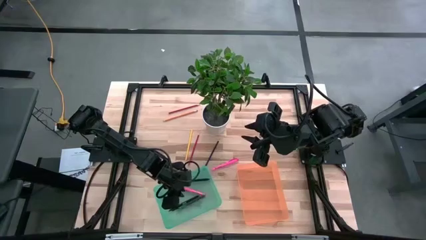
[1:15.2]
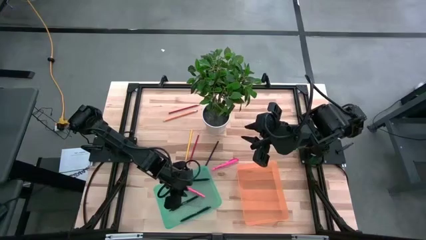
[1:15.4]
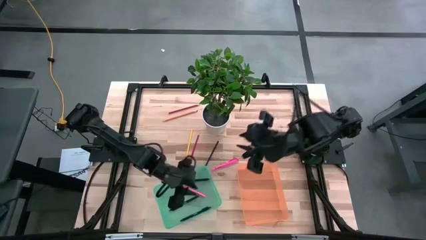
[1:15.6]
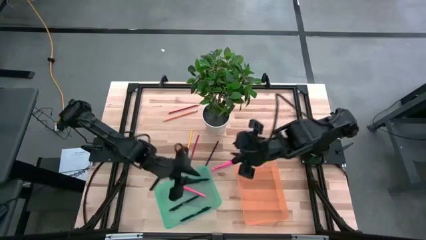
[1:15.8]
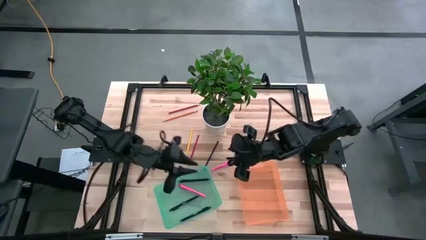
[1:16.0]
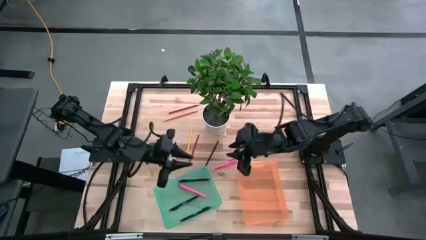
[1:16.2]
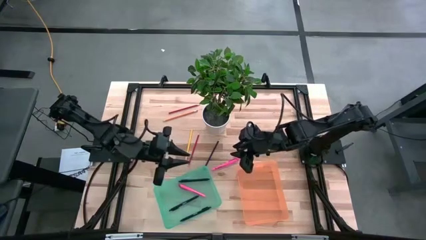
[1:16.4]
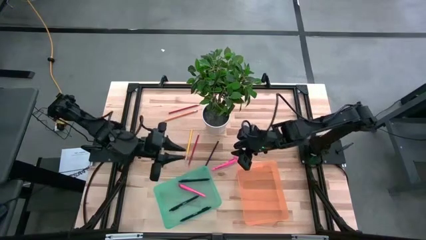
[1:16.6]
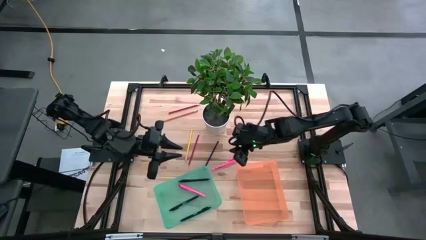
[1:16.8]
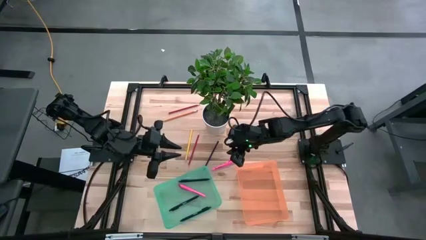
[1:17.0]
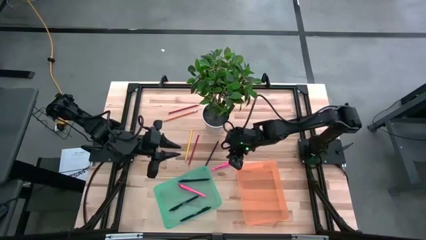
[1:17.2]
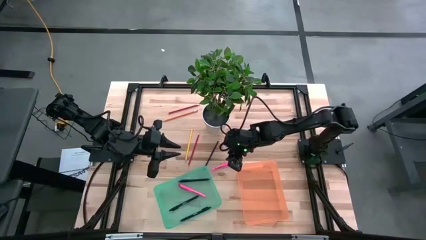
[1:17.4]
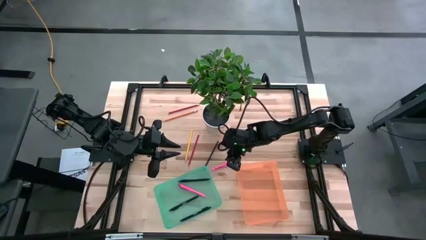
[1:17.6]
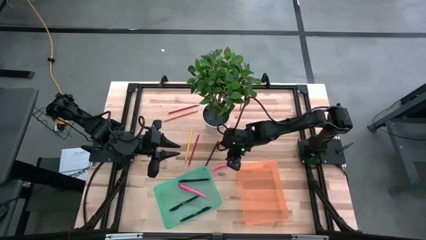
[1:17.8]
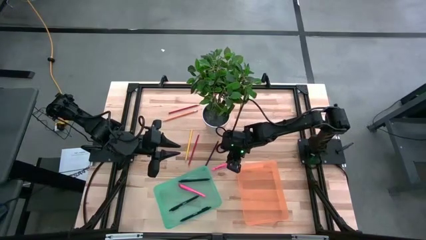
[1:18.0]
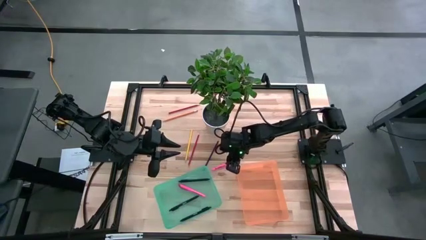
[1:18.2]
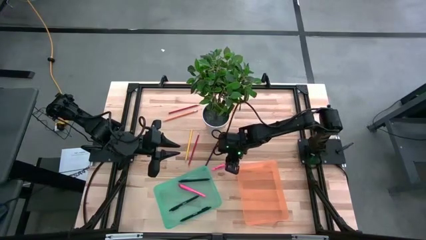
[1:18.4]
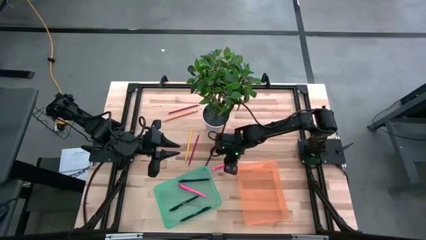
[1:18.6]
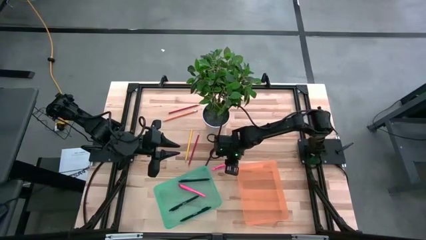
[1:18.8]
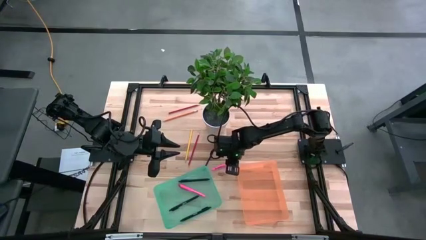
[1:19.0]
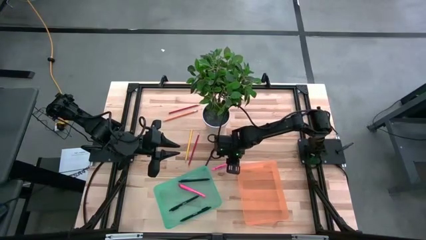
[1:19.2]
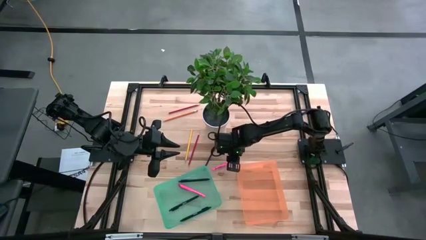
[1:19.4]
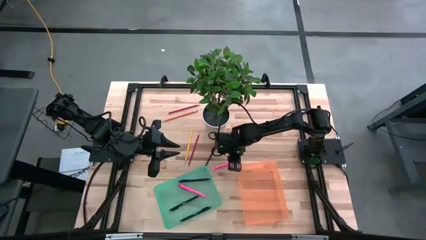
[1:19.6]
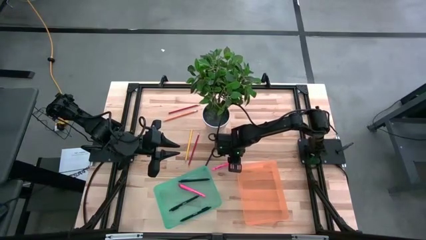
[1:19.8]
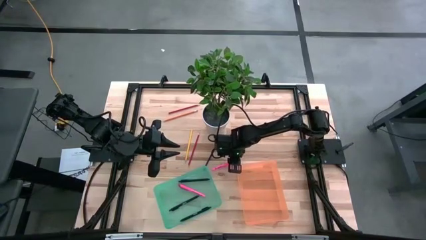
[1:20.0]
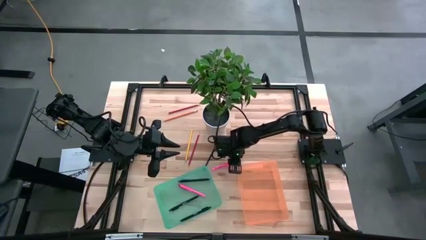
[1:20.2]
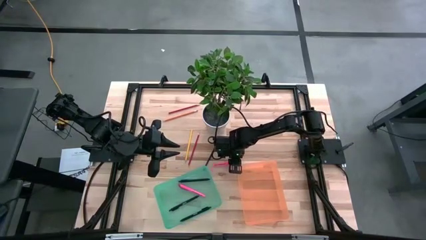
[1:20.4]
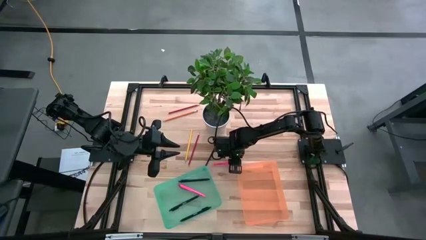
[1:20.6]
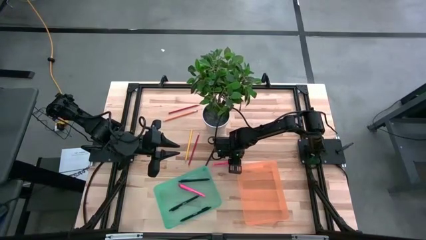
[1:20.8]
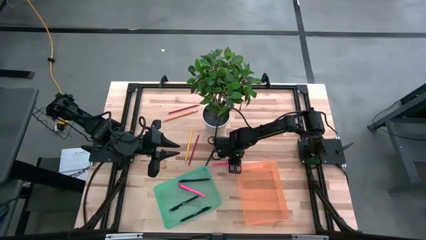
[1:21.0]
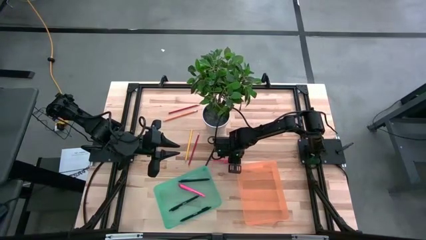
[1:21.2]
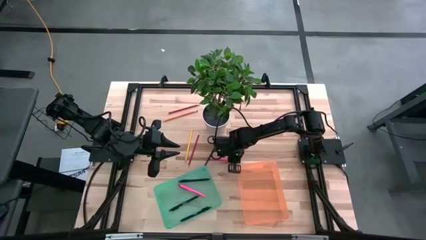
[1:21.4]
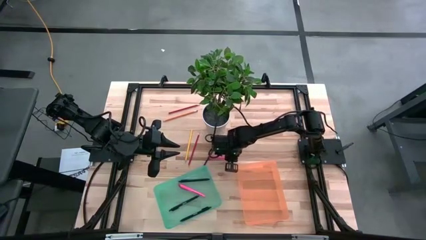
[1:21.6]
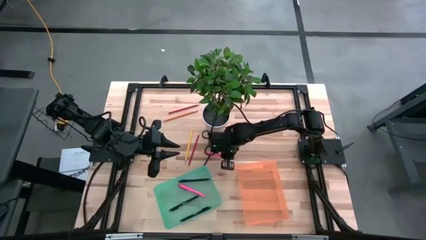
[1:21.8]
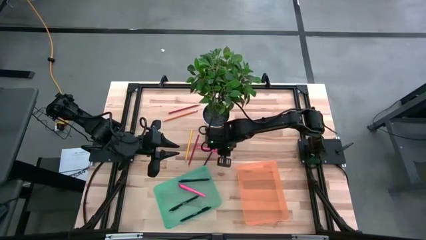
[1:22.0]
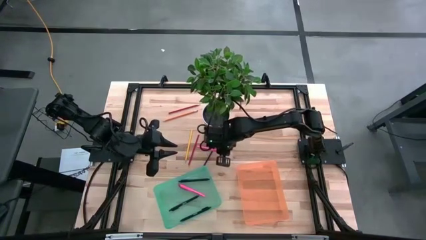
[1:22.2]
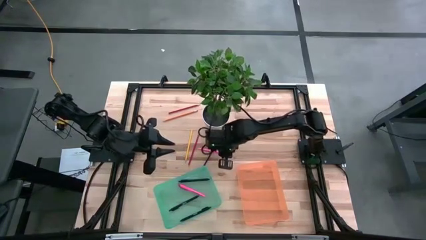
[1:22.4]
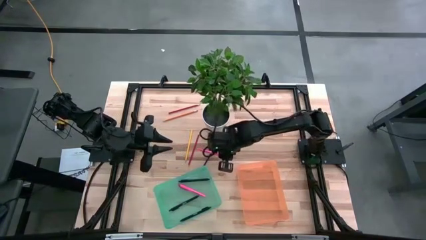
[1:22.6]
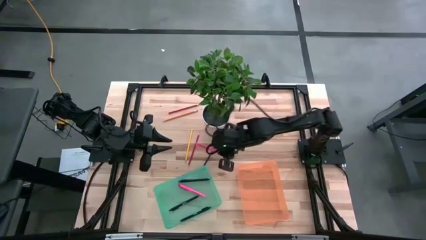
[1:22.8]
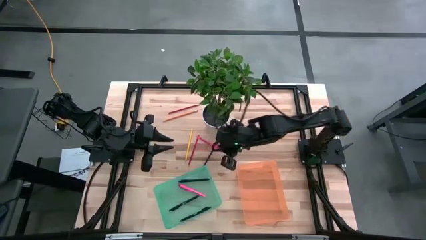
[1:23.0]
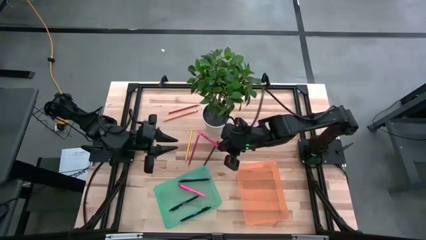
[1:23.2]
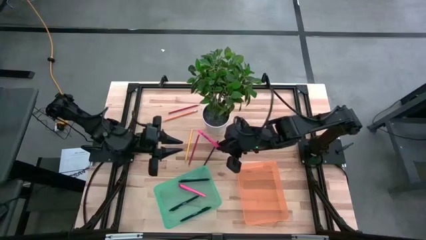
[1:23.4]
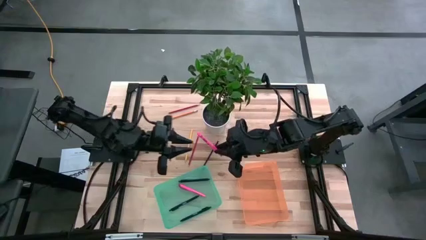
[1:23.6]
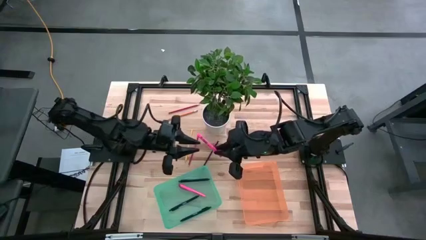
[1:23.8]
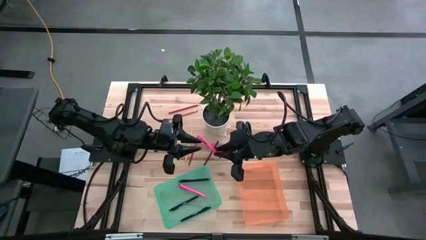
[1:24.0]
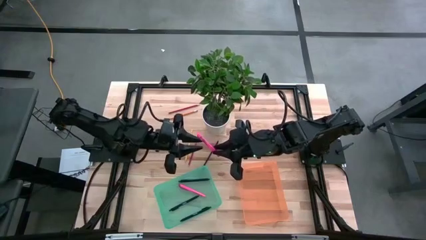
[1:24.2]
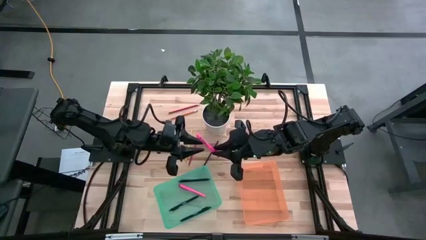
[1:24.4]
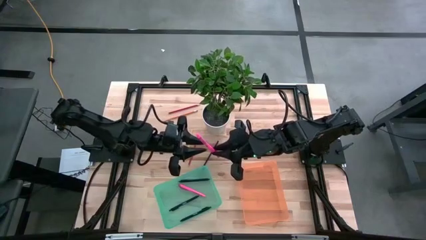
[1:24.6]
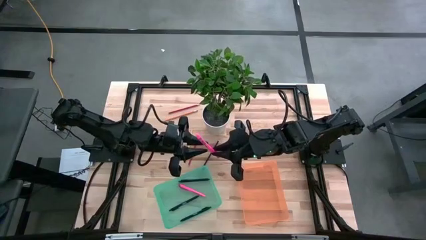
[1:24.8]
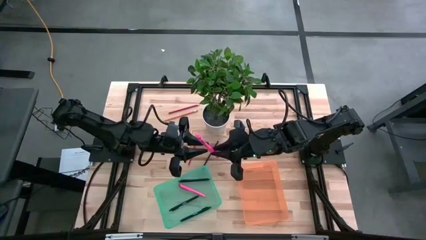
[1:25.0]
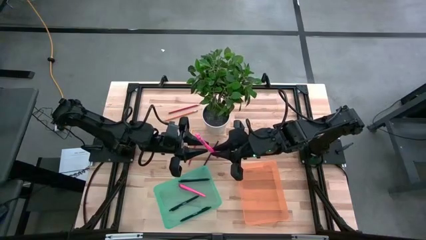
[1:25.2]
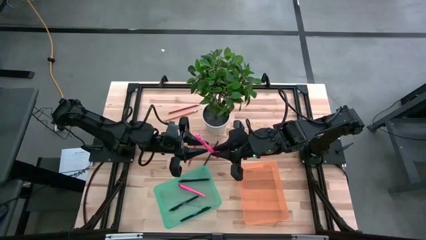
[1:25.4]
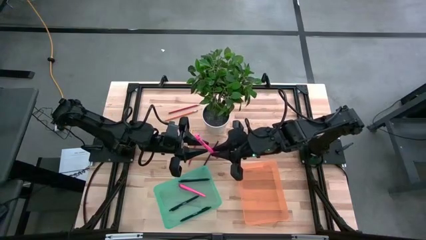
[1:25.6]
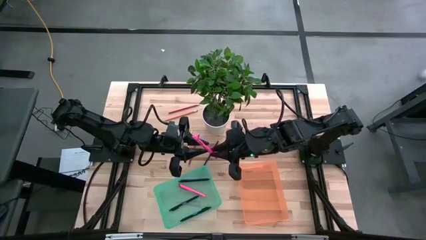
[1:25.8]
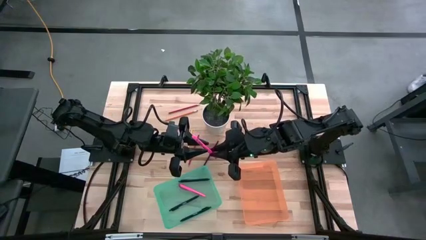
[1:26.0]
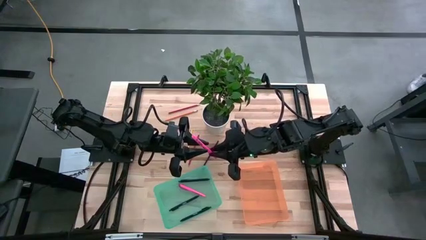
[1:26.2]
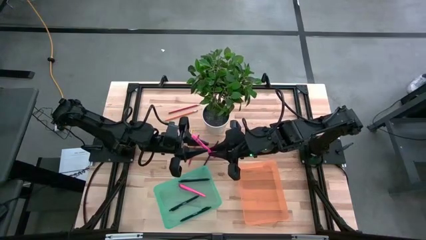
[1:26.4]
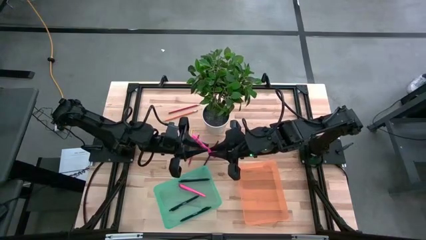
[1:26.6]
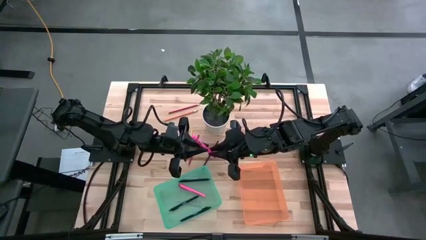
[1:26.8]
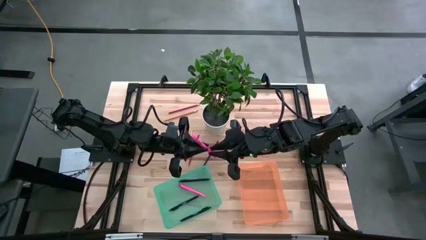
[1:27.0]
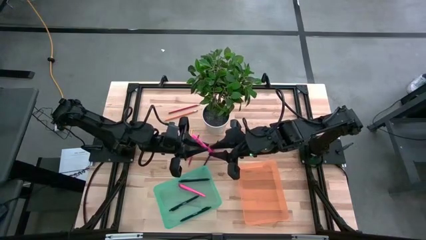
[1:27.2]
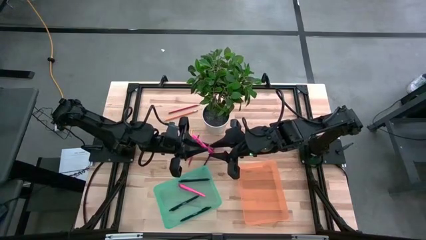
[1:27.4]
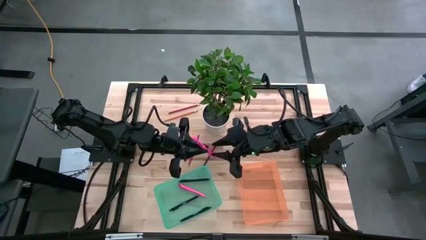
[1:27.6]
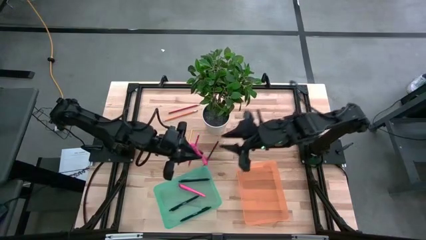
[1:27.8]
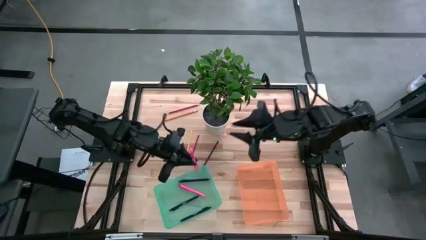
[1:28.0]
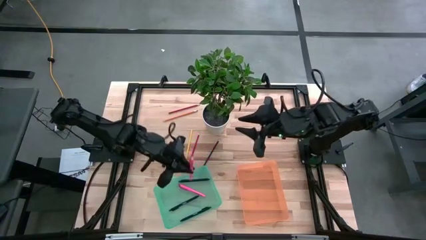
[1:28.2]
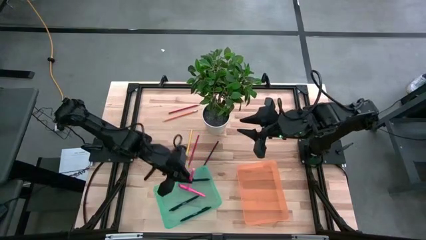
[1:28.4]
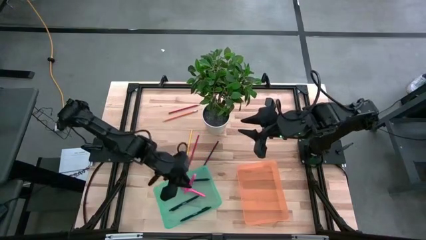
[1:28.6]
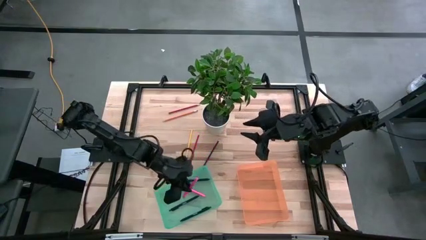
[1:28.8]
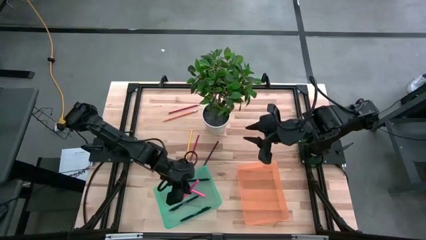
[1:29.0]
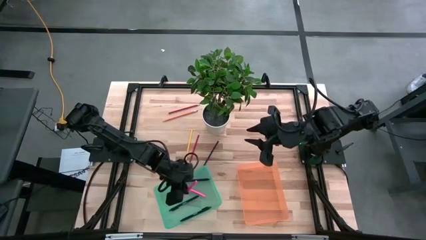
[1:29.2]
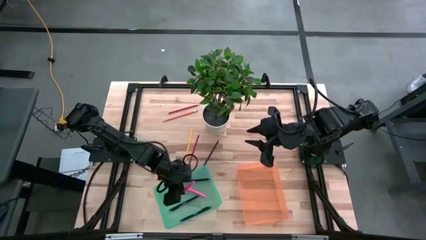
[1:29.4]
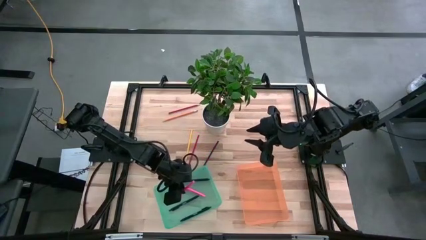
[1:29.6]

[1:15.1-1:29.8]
Task: Sort pens & pencils
Put the pink pen into the green bin
